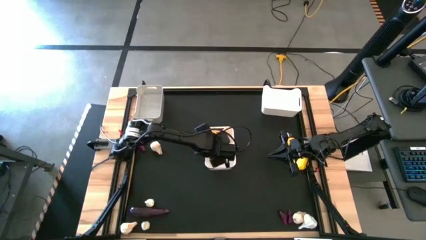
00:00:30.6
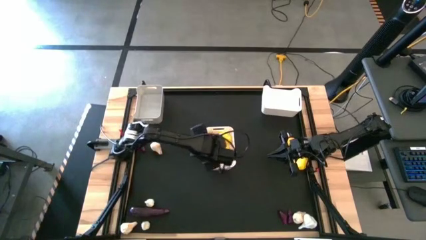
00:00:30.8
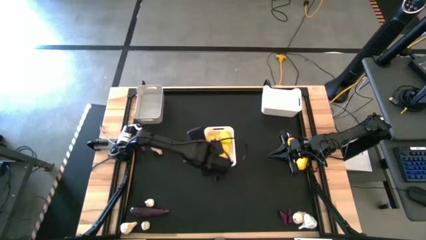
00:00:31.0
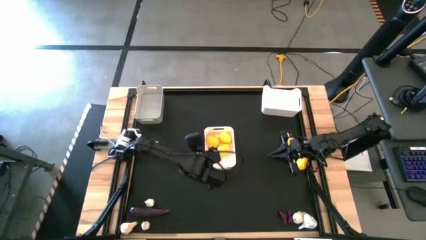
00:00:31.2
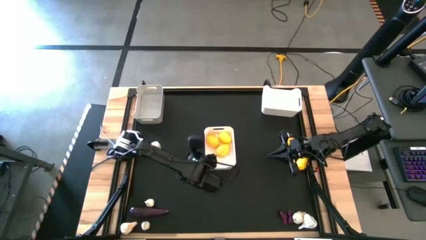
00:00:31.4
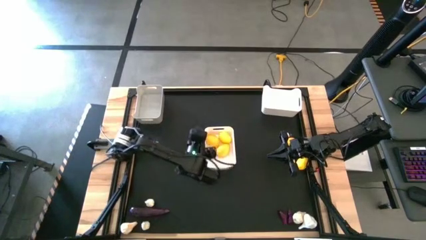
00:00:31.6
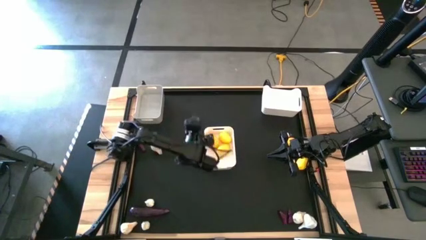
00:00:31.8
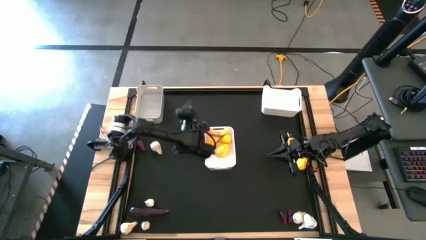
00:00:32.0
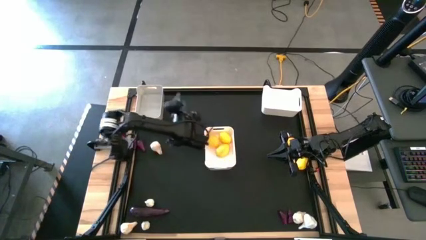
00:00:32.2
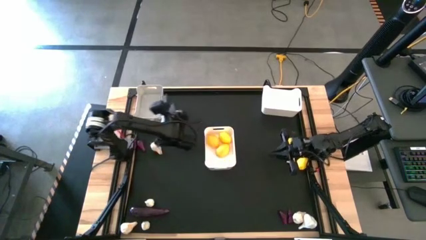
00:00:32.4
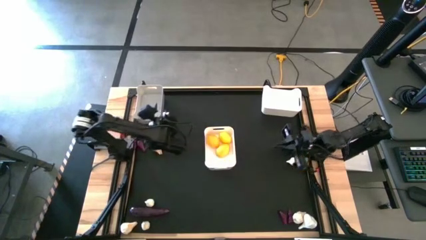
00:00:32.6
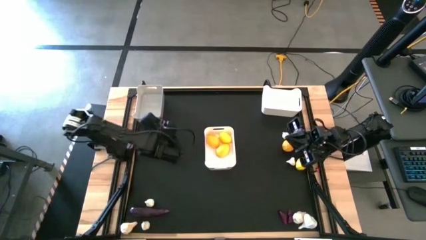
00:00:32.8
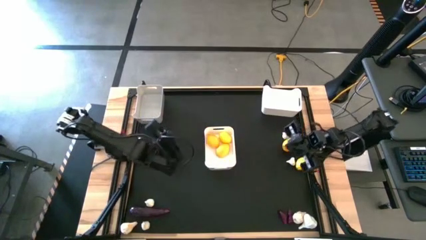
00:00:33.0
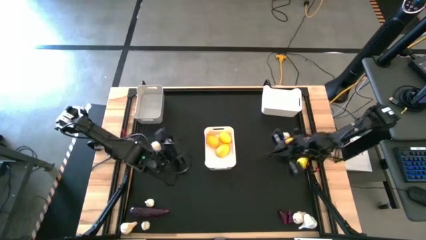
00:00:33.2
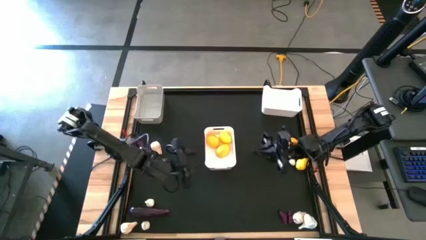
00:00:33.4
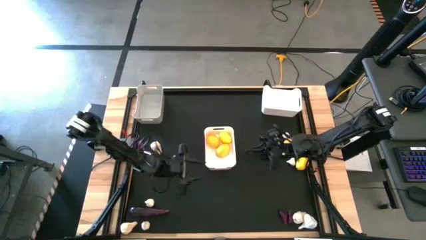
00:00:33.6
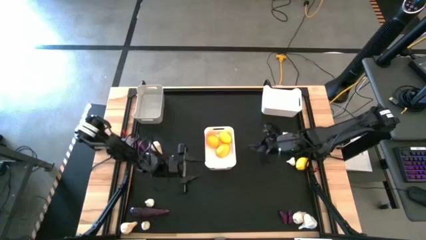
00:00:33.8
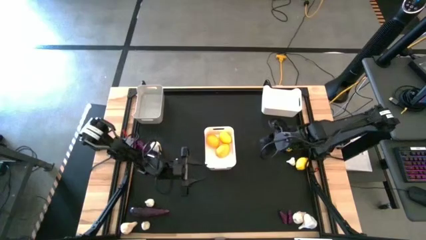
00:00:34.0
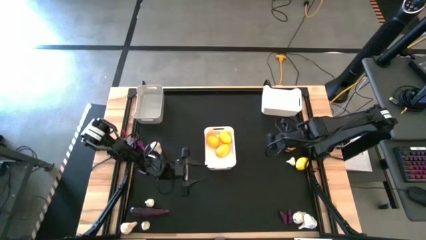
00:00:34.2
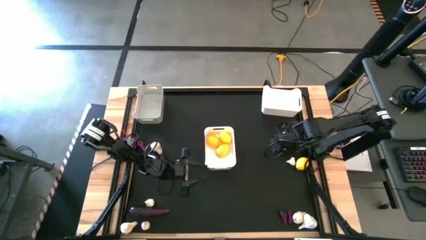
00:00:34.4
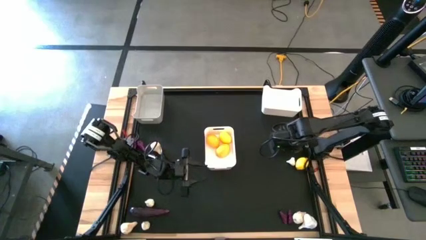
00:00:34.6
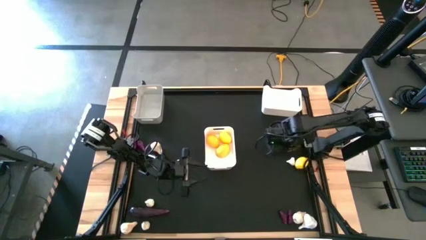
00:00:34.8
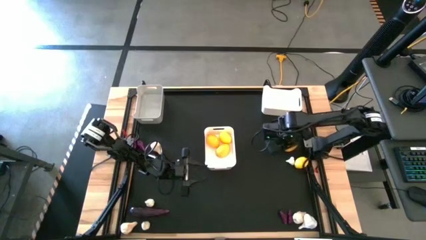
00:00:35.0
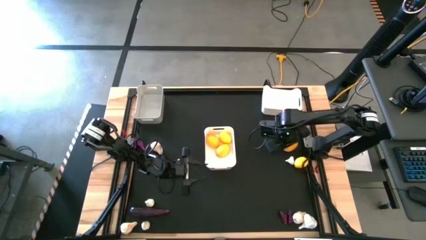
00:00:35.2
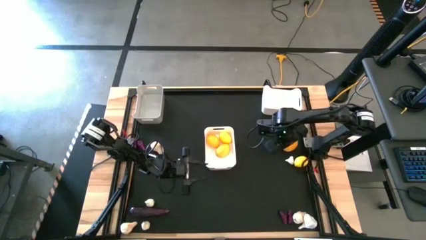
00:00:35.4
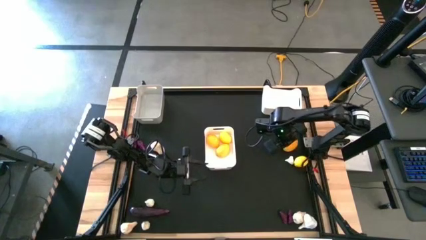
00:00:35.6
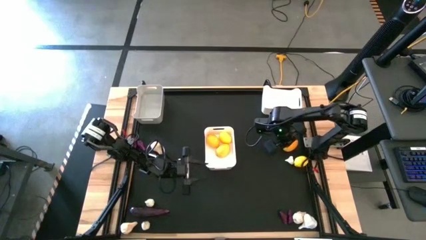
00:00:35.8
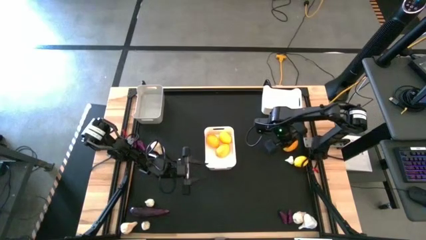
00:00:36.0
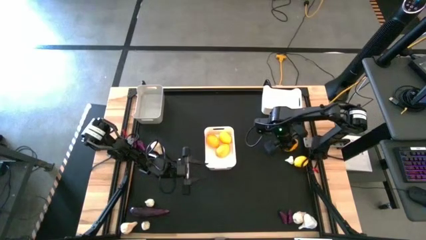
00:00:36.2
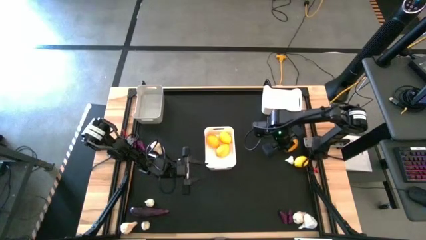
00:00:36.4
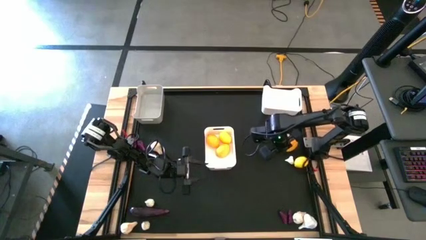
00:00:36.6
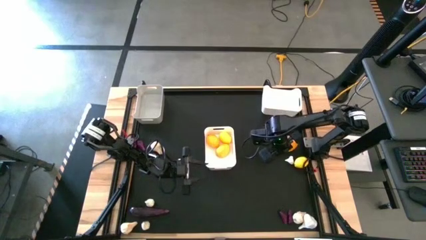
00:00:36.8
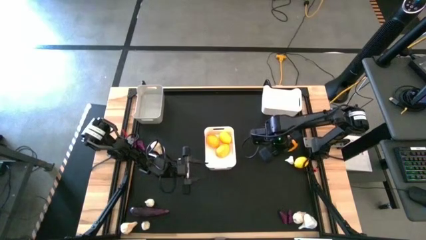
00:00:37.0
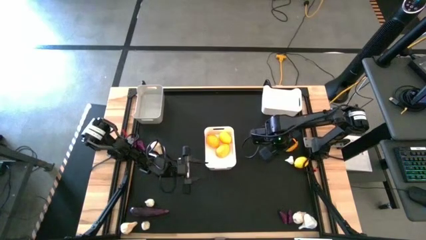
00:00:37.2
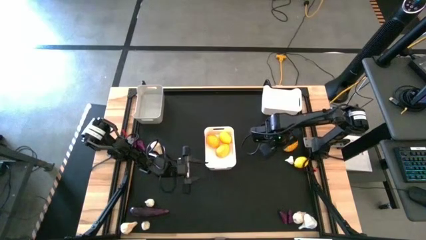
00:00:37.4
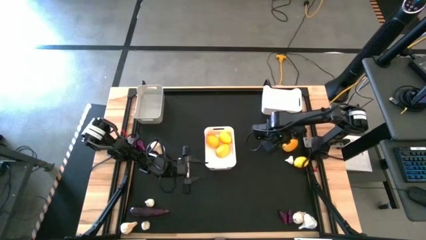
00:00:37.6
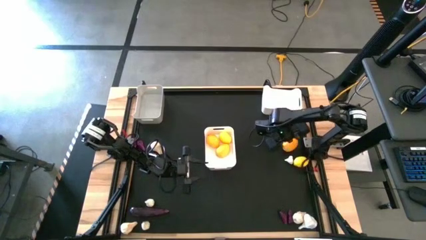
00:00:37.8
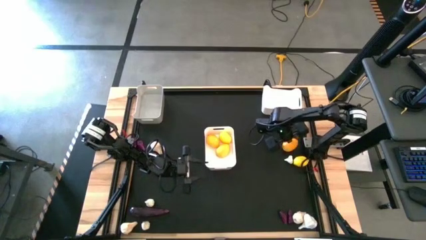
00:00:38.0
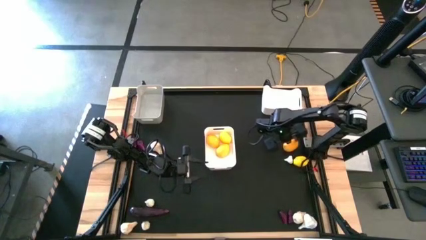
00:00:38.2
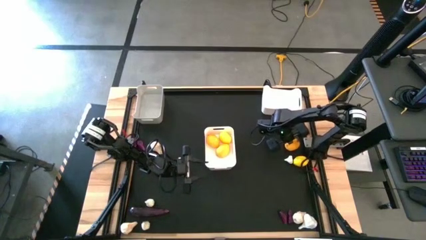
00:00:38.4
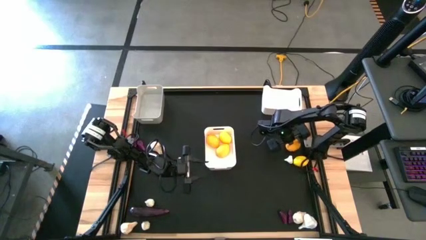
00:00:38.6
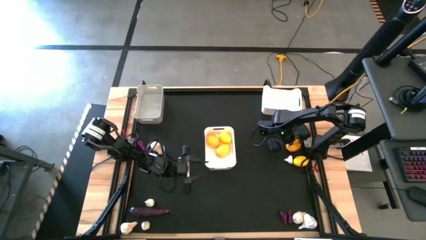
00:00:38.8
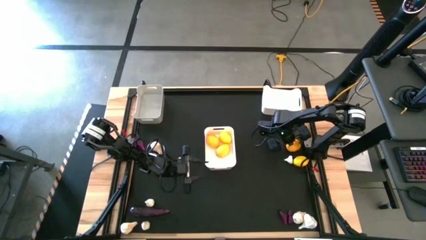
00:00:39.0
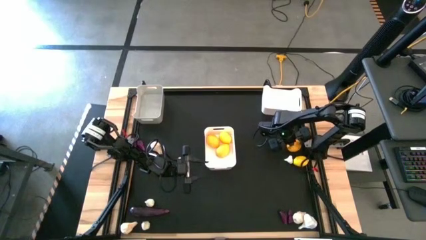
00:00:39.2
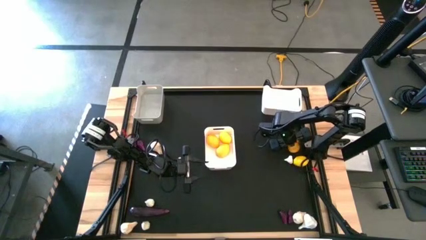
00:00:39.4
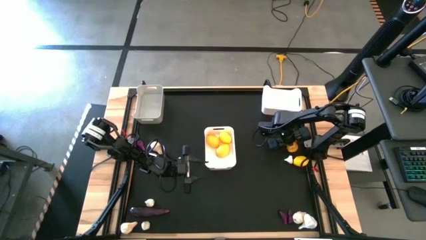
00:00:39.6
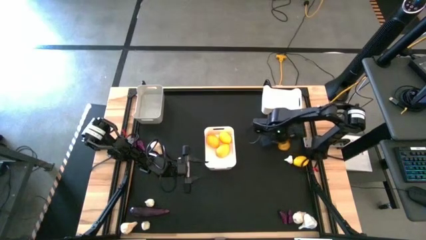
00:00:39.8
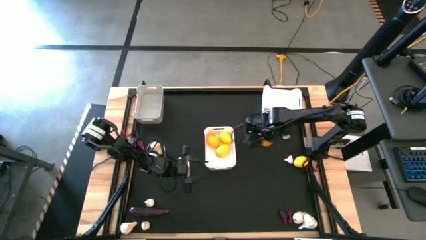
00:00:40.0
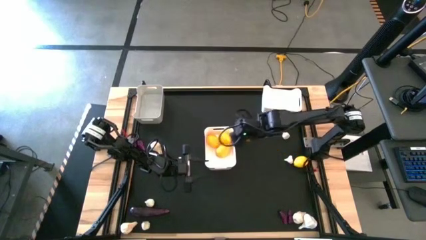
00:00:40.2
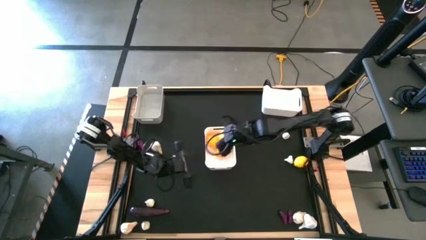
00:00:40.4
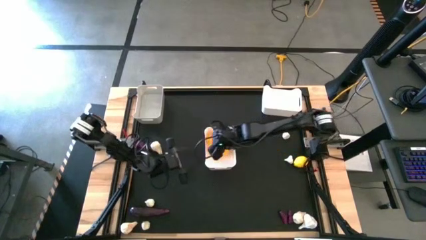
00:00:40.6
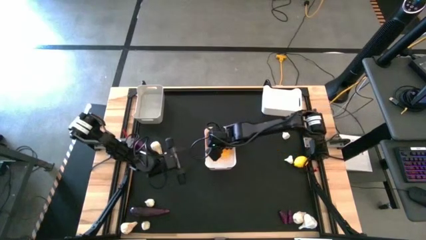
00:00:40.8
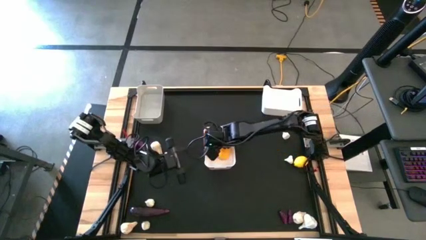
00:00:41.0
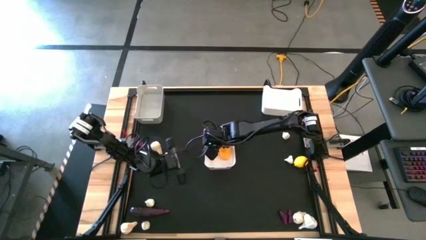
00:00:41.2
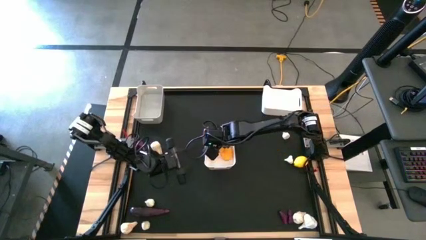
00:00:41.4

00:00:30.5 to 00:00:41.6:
Task: Sort produce into baskets
Put the lemon into the bottom white bin

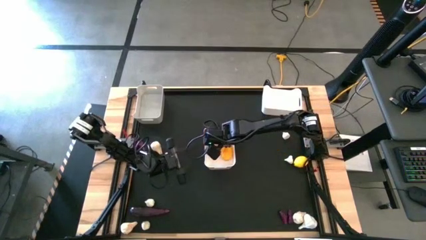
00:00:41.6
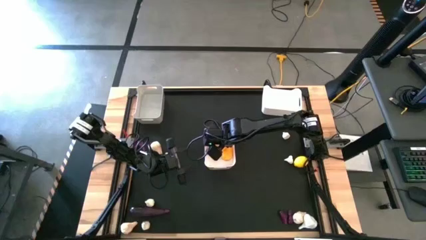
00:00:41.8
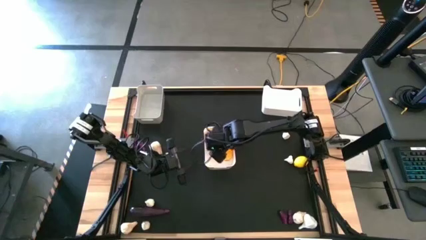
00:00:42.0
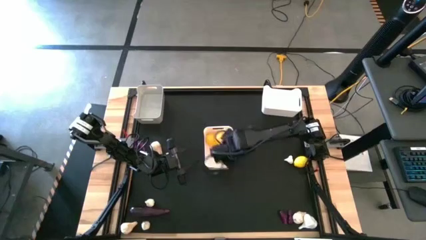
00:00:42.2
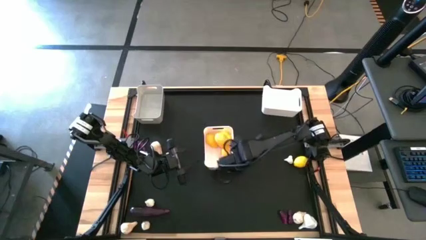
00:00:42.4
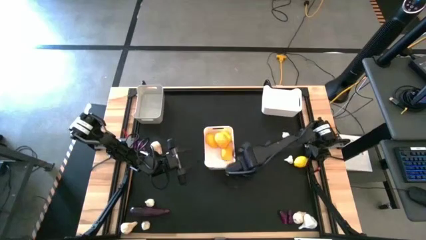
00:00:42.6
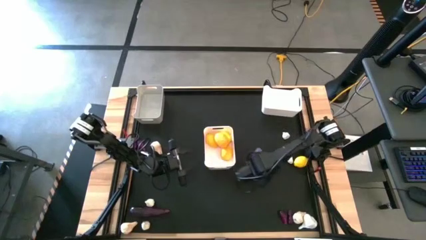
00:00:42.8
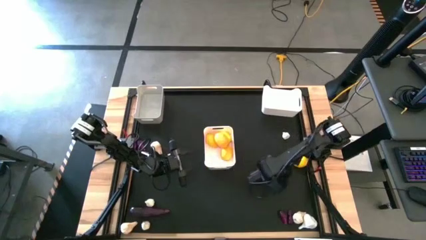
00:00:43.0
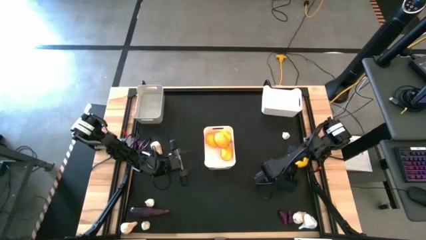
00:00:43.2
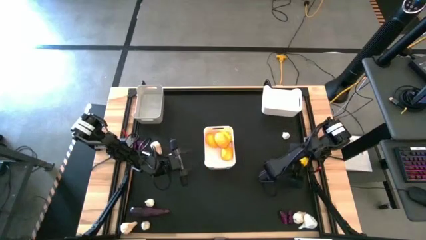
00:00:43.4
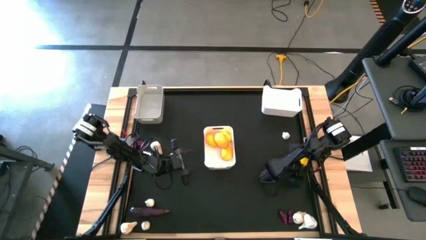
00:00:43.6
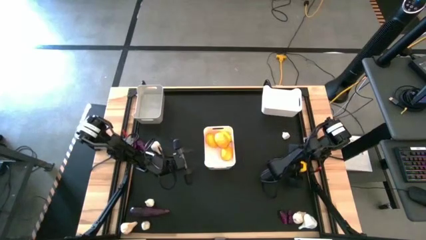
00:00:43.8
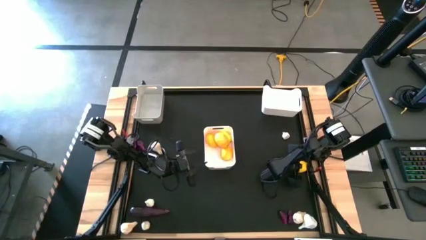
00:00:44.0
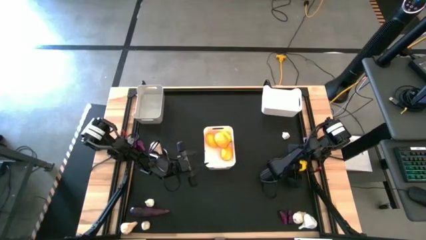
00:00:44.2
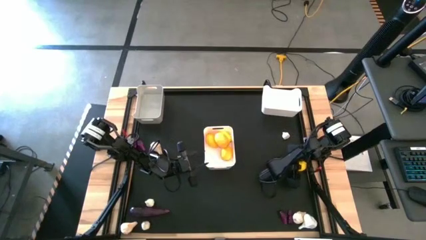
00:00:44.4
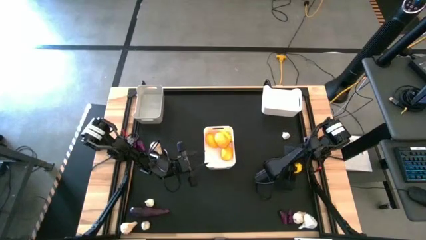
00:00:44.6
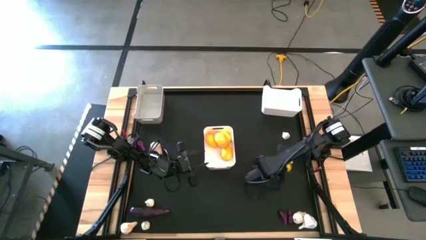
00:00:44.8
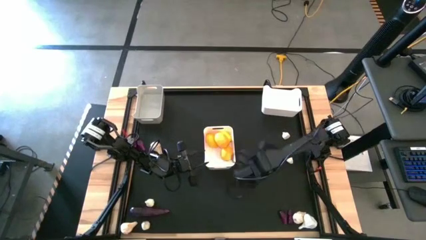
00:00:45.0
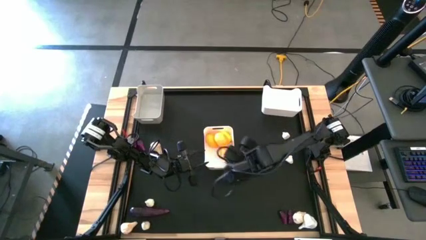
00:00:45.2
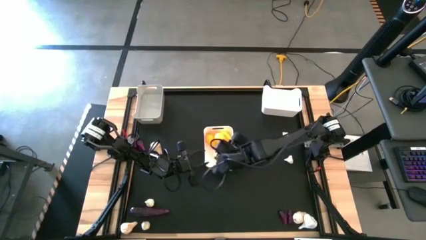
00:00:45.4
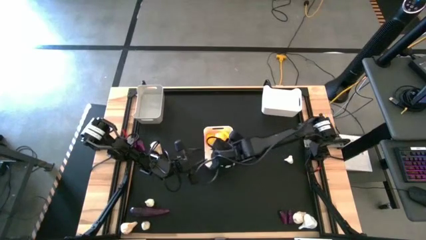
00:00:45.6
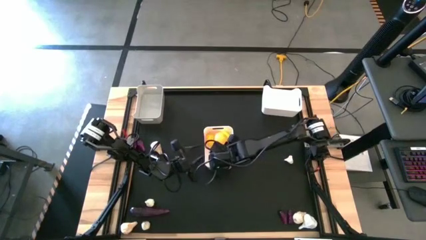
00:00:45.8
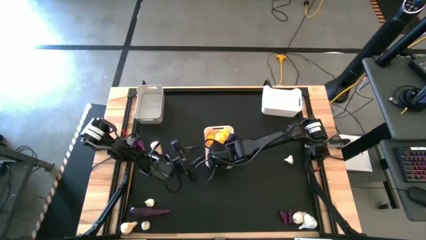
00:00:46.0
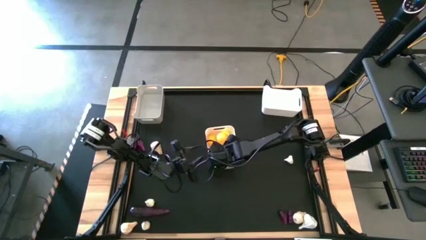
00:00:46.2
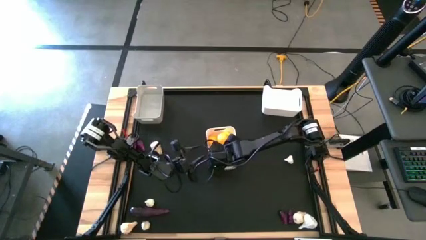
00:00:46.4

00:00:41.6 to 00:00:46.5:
Put the lemon into the bottom white bin

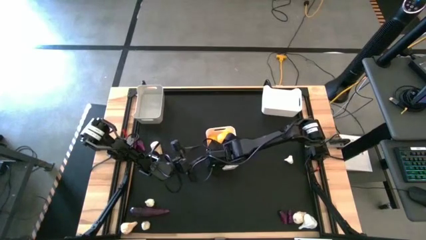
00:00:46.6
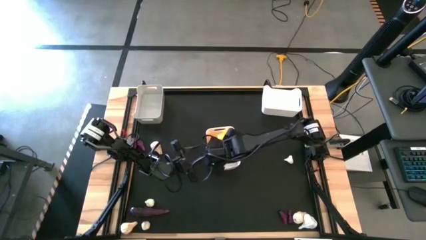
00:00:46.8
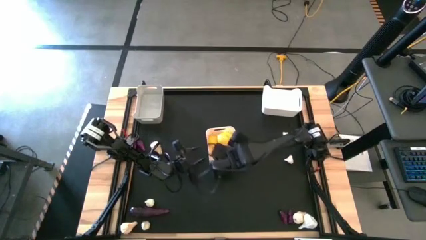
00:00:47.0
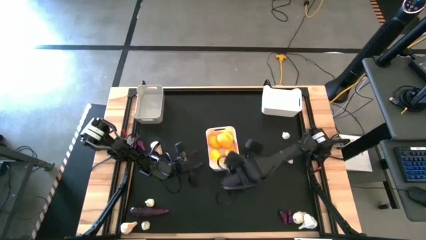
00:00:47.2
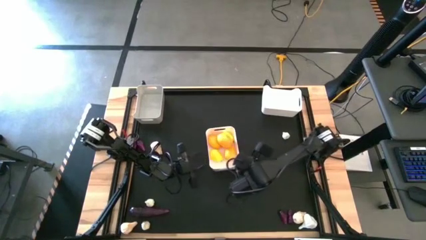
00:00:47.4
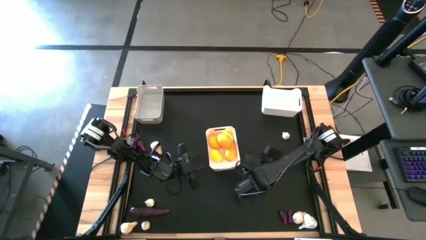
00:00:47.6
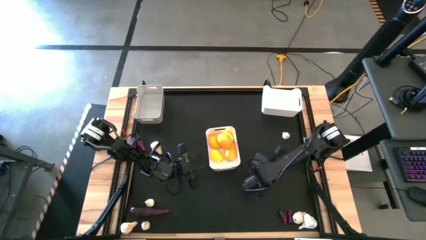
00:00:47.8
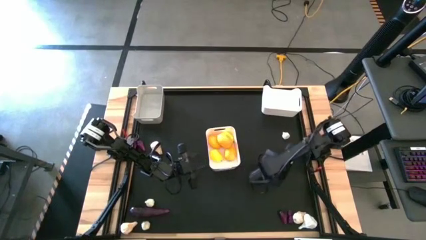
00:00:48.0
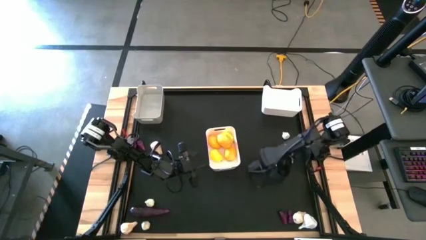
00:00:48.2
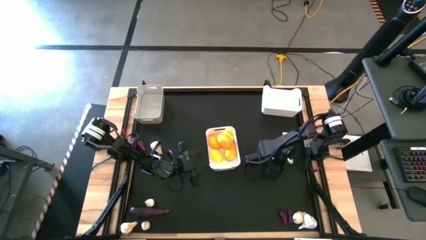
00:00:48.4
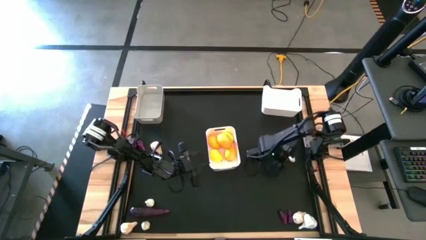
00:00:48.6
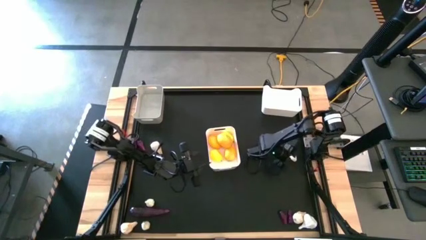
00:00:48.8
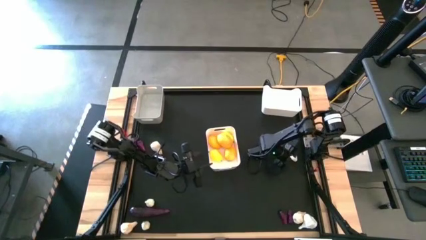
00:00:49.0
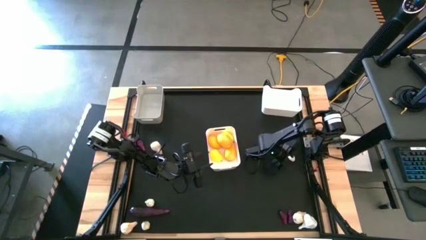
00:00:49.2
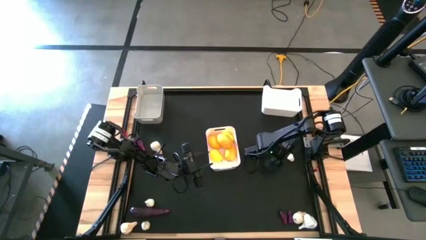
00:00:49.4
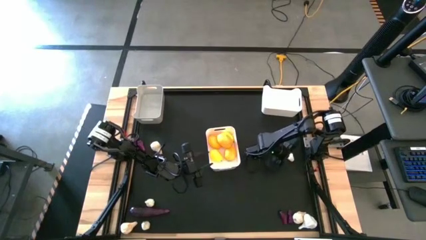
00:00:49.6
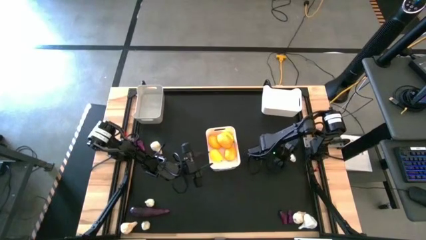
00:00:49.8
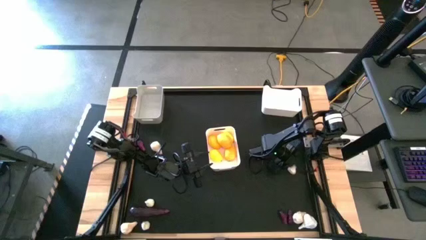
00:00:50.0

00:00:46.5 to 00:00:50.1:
Put the garlic into the top white bin
